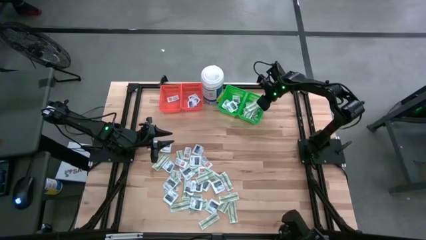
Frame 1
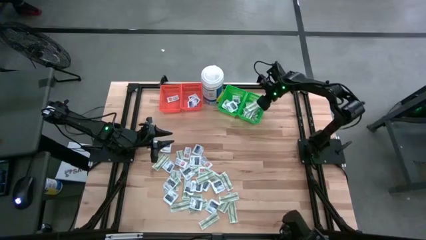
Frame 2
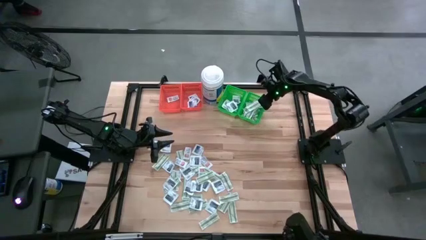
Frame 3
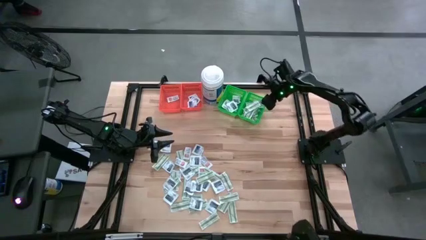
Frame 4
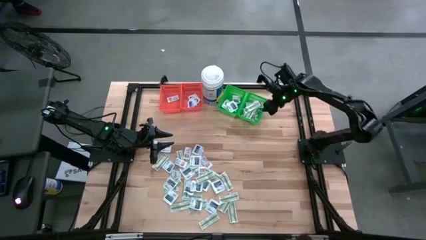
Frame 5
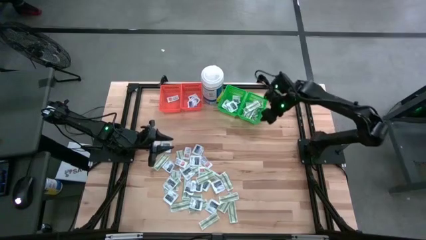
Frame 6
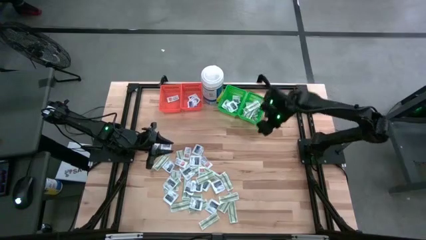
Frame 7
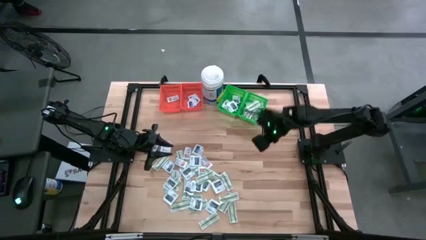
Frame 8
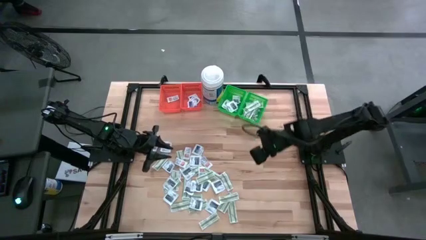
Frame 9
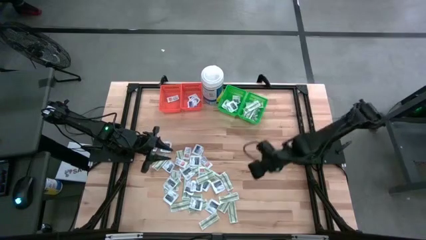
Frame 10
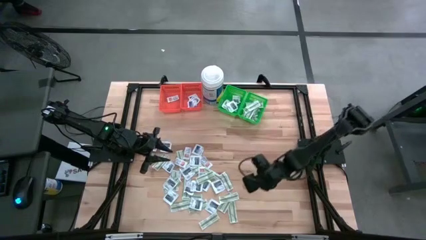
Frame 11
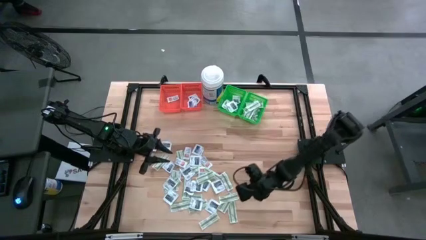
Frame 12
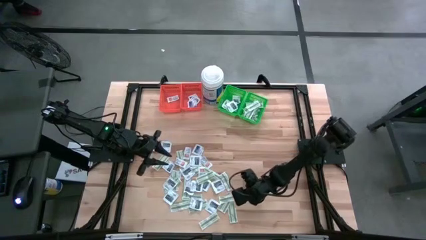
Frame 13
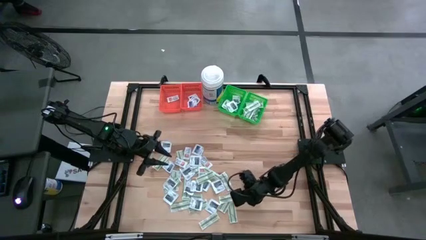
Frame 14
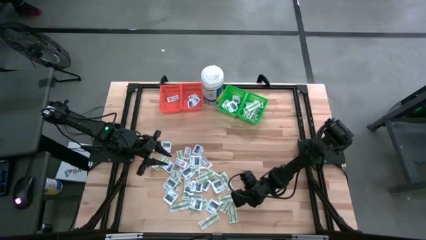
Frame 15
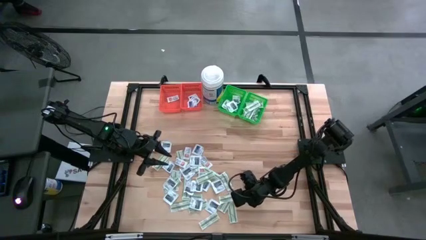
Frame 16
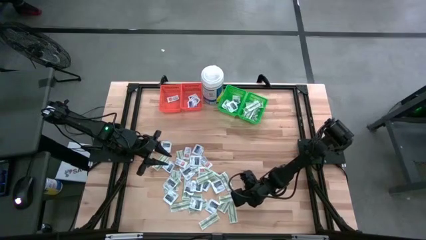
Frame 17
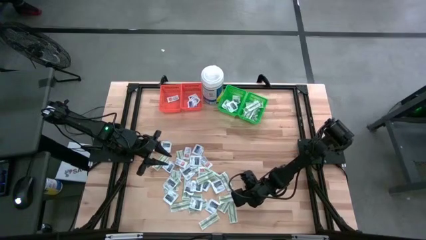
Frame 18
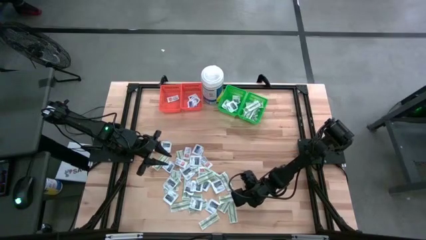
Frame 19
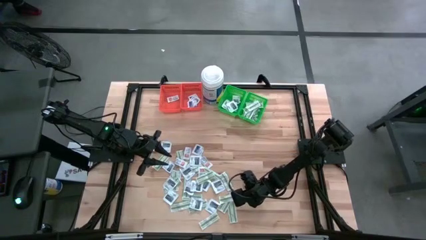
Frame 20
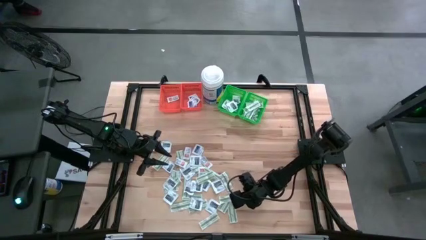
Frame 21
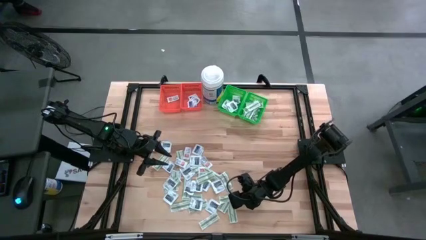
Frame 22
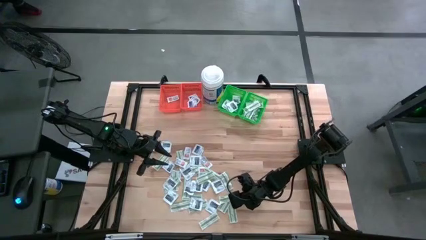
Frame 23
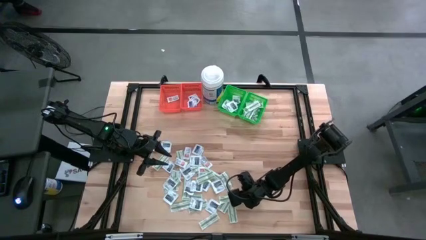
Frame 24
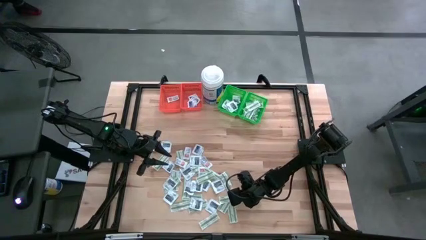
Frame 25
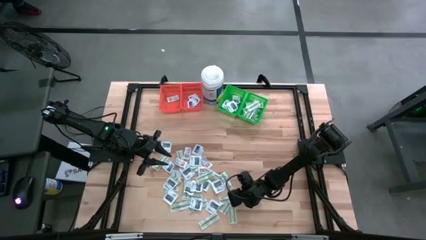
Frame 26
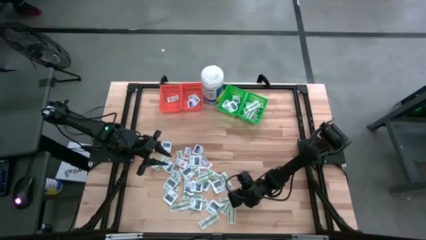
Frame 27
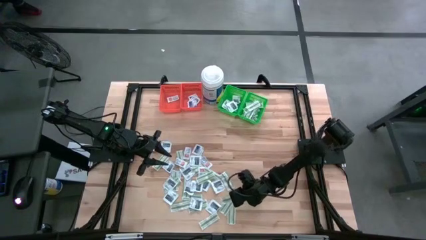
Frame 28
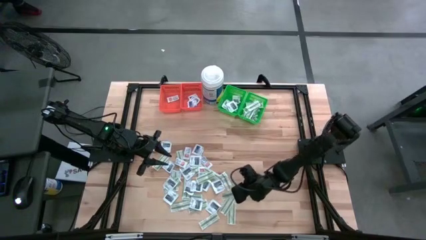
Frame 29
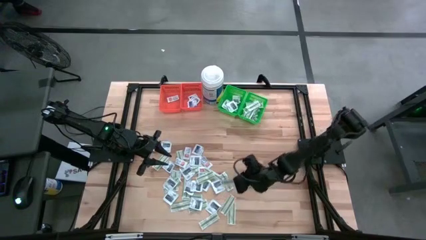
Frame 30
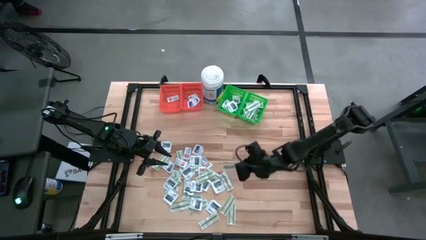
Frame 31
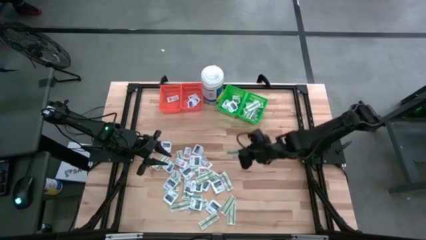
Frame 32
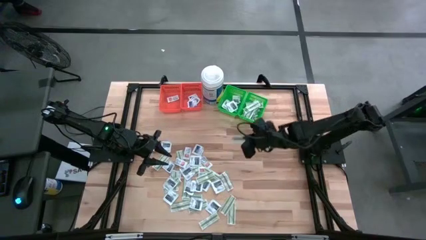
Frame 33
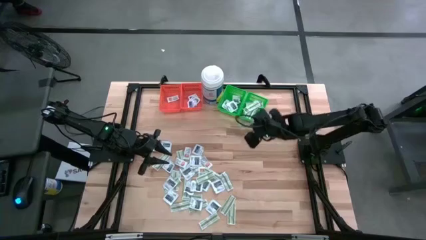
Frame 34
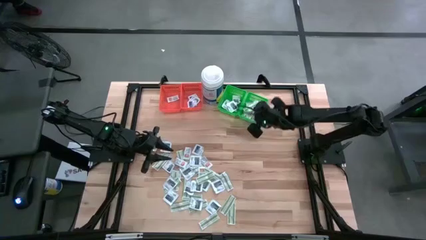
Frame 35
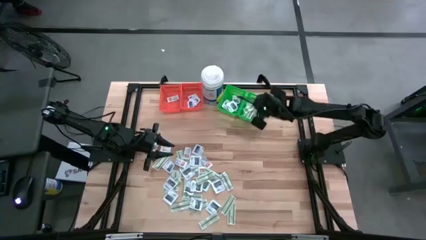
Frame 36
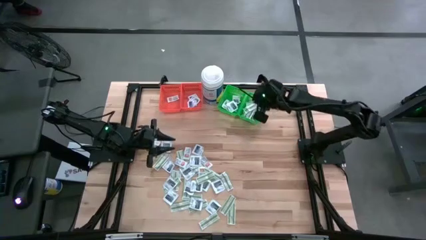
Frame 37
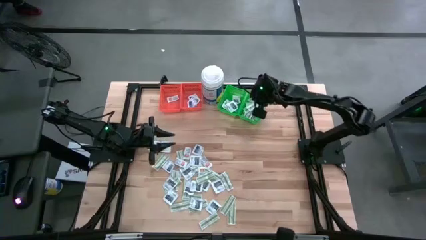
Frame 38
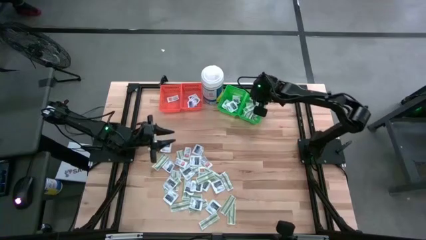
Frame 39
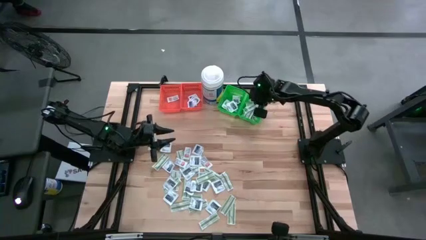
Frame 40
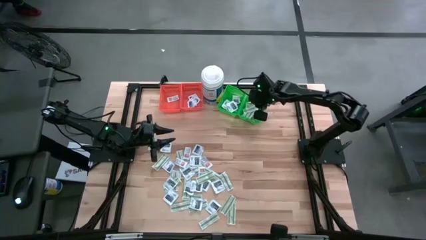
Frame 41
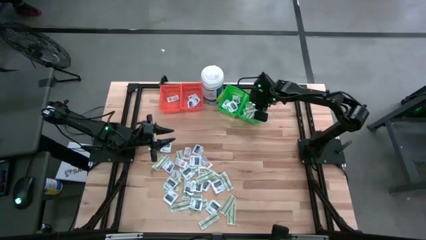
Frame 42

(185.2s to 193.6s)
Task: Pick & Place First Aid Supplies
Put the green bandage pack into the right green bin

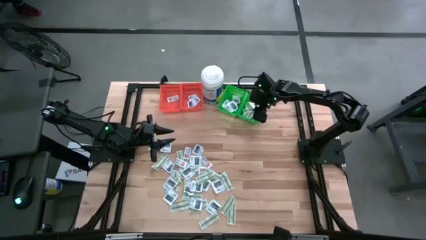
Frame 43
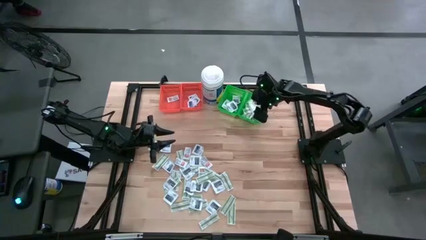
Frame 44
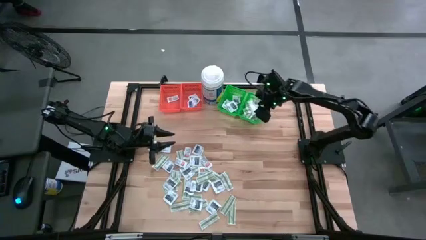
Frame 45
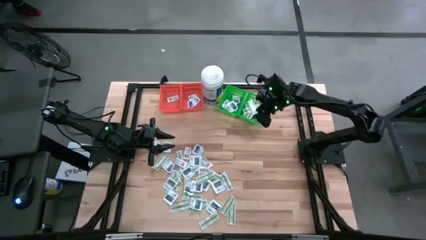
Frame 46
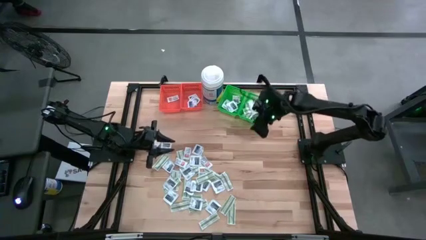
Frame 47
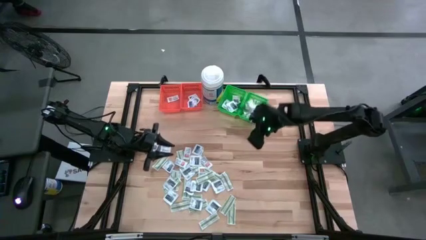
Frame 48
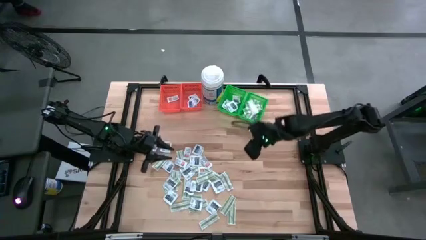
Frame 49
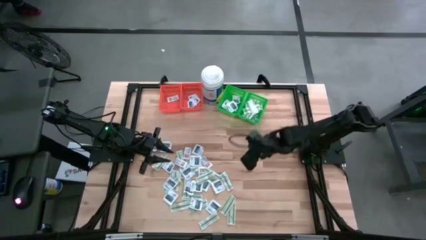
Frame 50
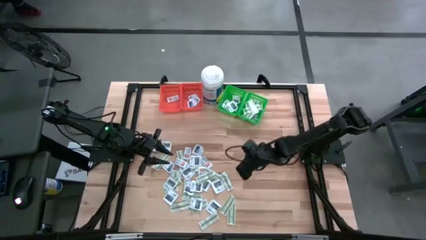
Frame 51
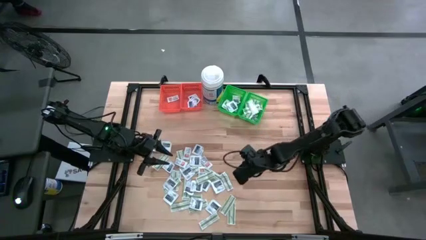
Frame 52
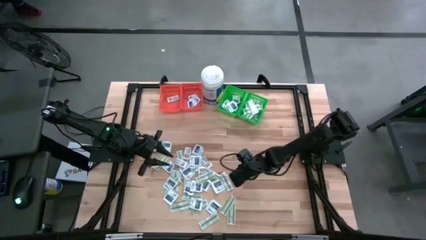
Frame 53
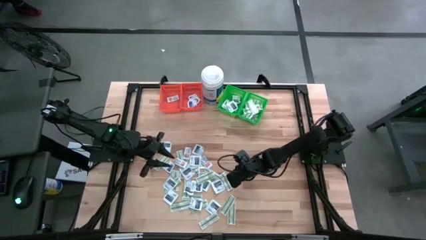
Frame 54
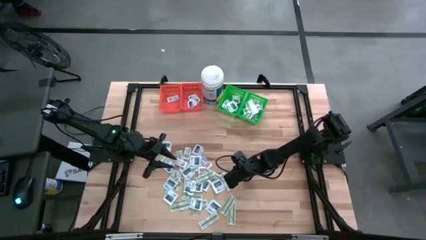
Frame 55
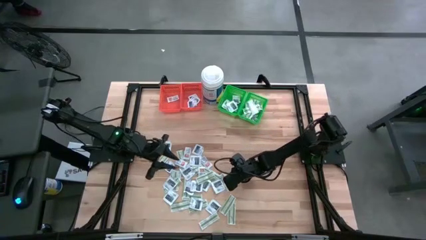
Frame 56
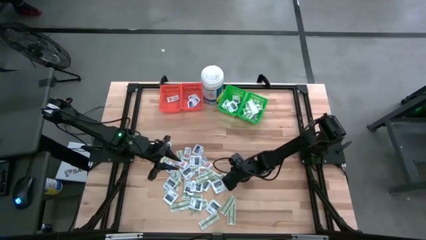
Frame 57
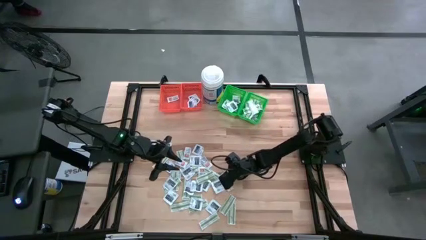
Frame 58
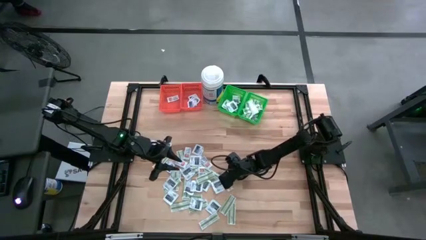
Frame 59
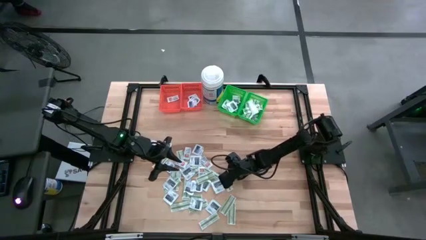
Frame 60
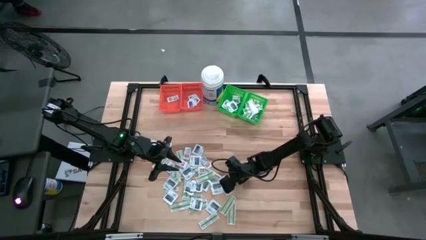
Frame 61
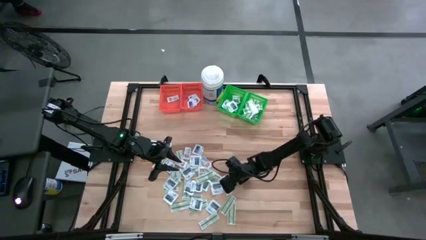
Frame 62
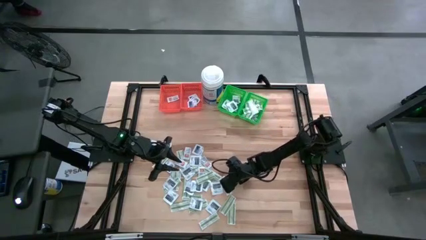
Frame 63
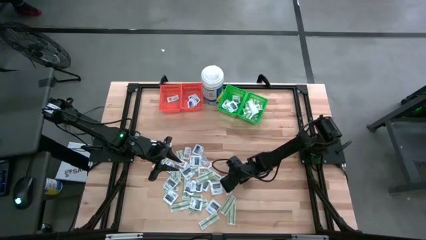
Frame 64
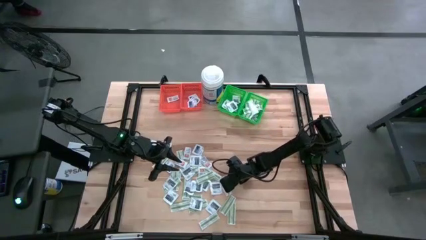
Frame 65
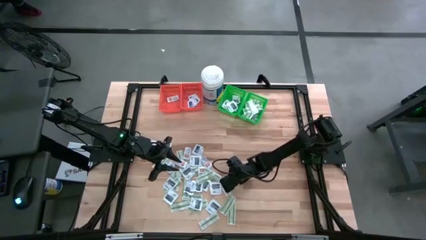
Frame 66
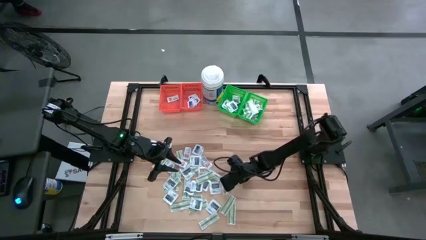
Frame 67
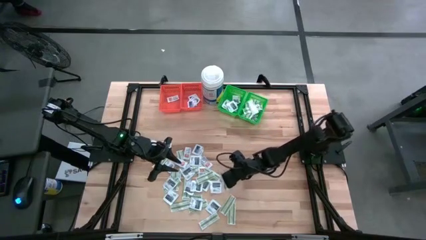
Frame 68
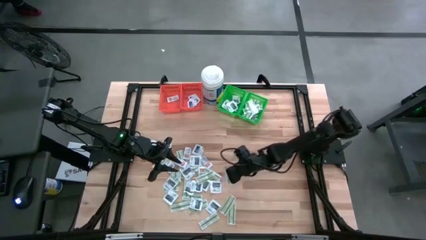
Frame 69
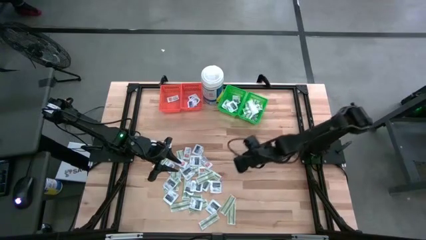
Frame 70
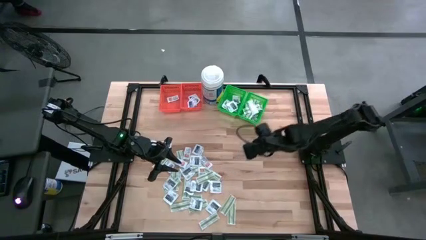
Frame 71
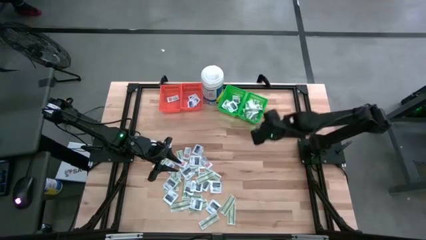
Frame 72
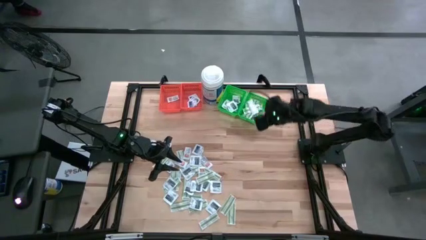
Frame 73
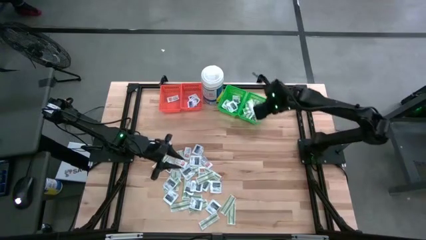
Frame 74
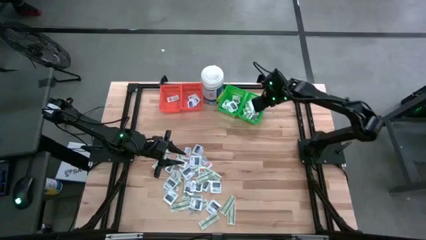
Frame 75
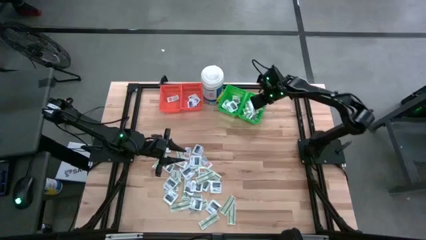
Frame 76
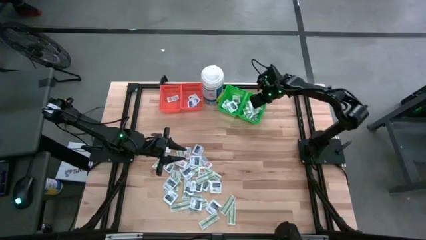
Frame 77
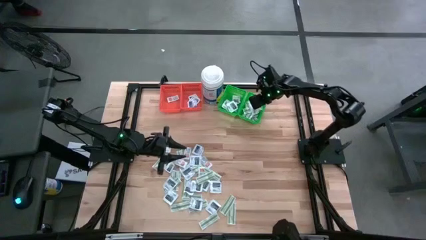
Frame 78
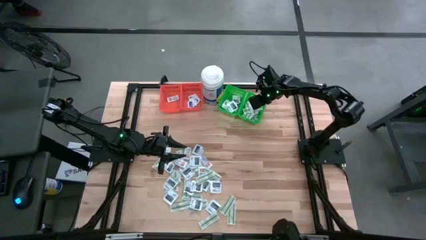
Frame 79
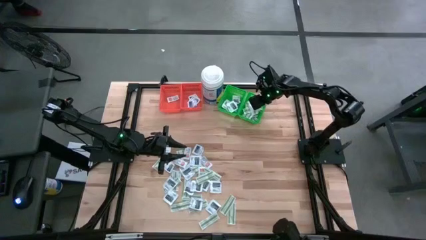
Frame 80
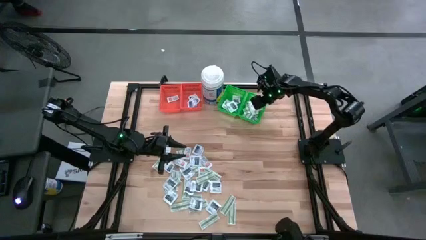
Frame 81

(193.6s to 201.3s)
Put the green bandage pack into the right green bin
